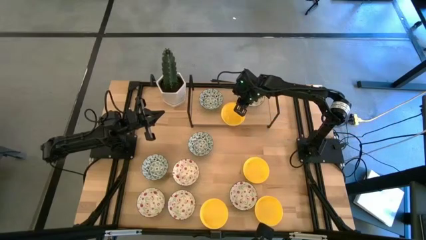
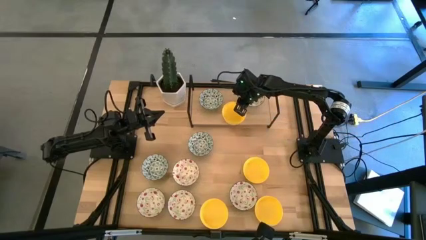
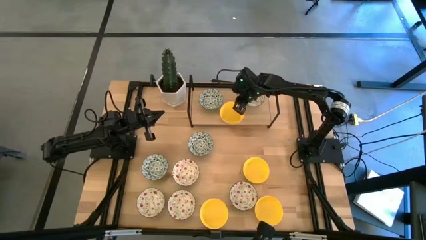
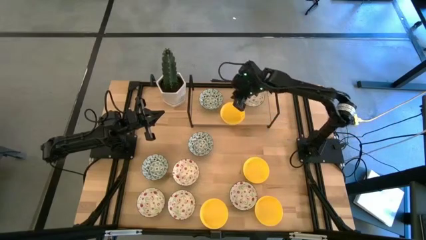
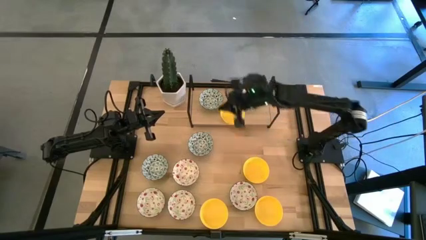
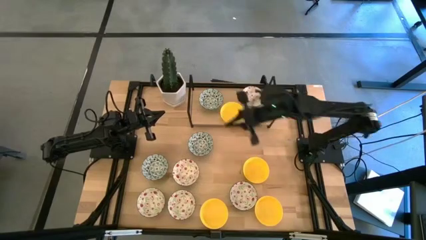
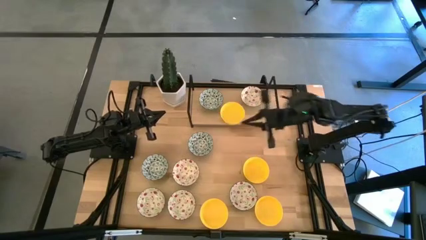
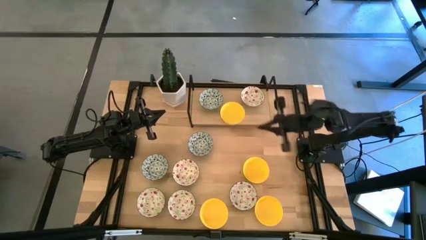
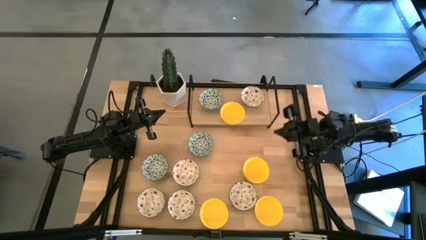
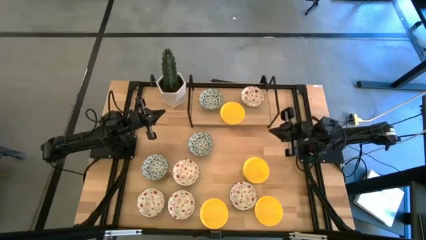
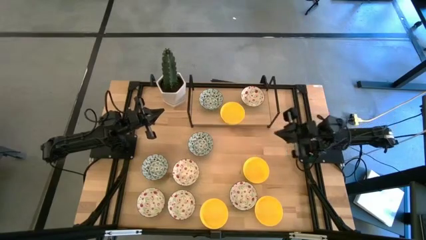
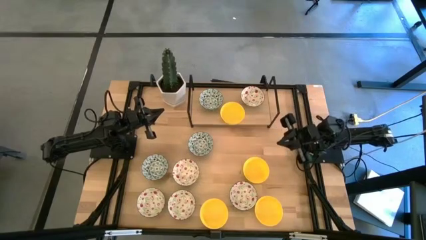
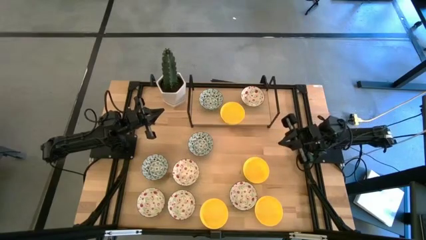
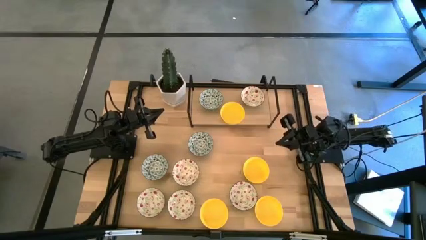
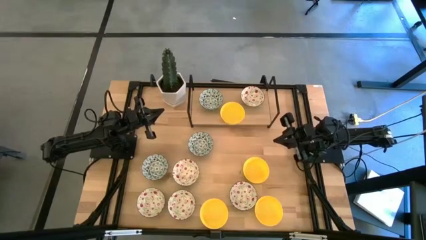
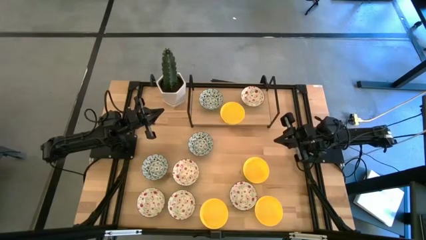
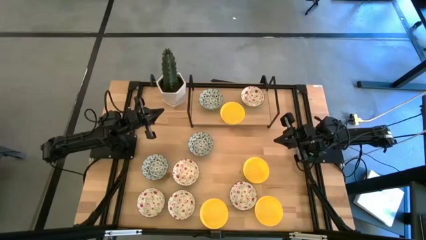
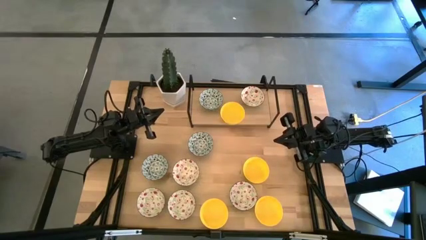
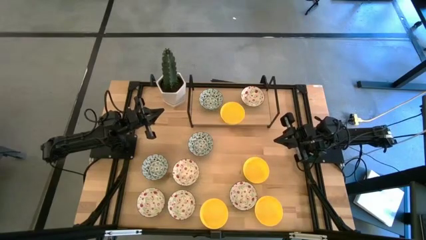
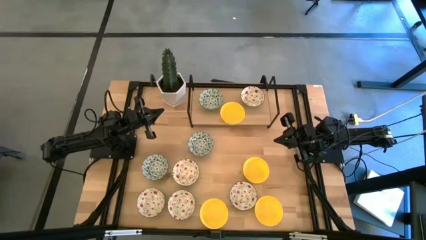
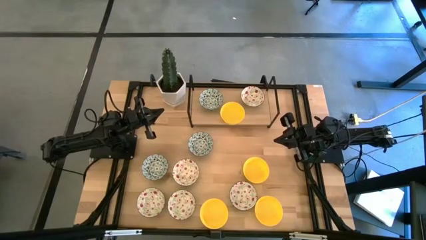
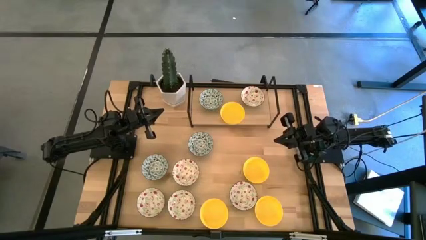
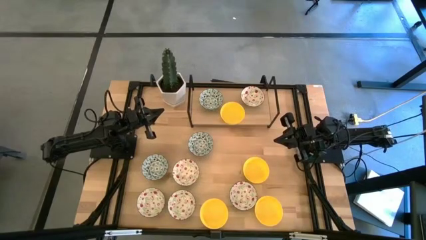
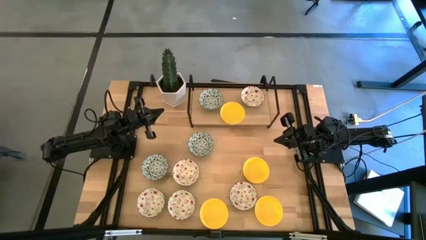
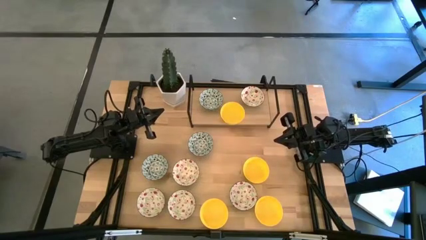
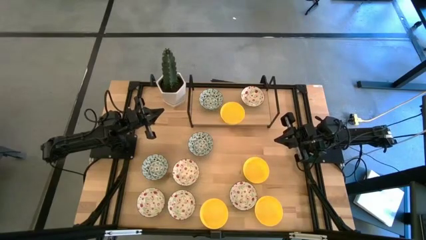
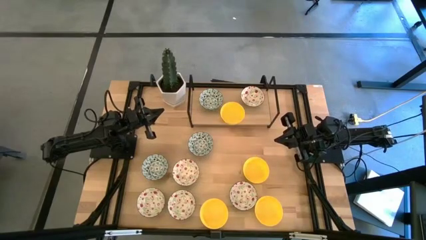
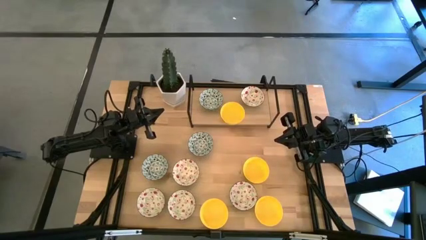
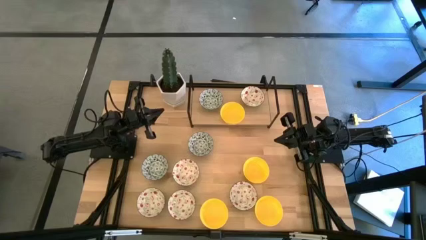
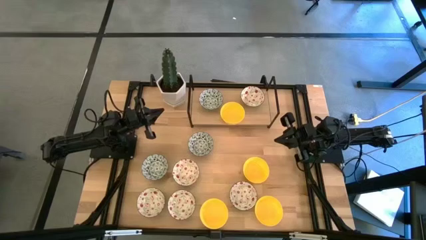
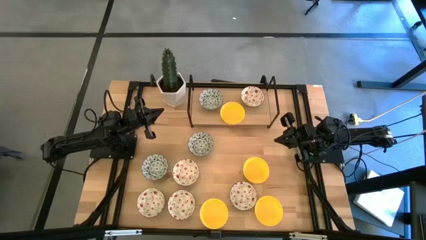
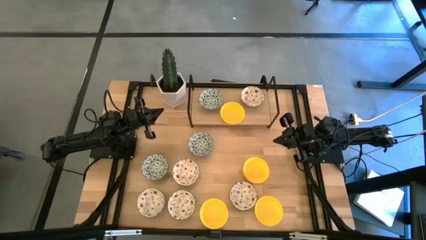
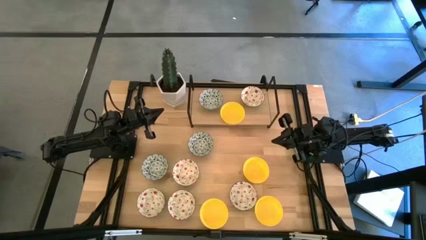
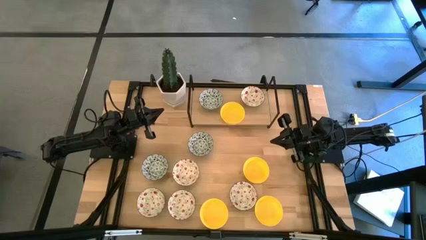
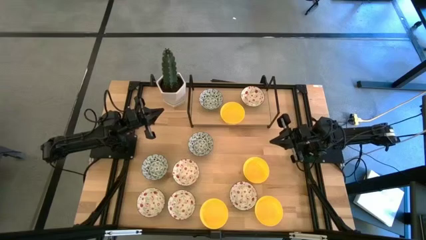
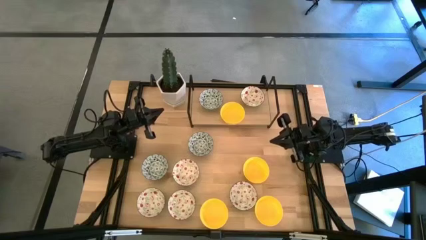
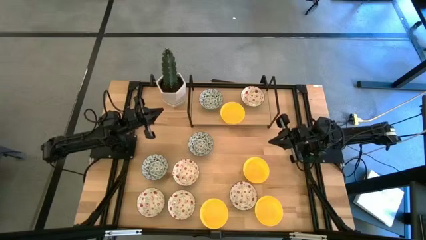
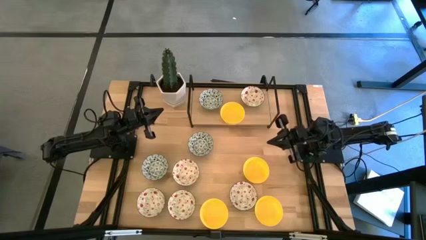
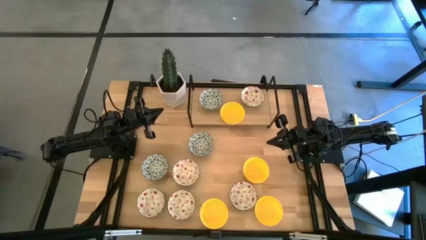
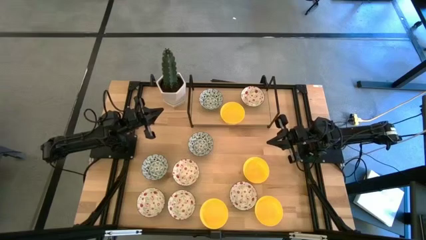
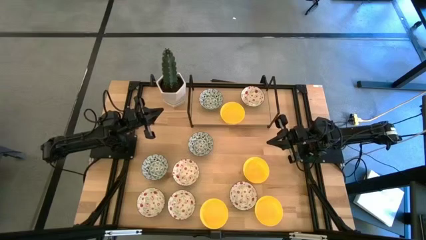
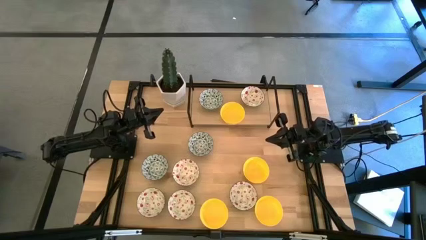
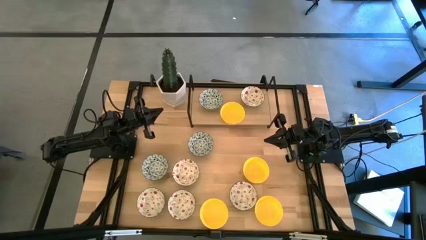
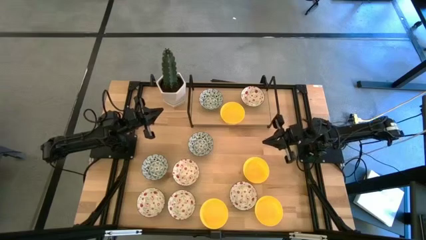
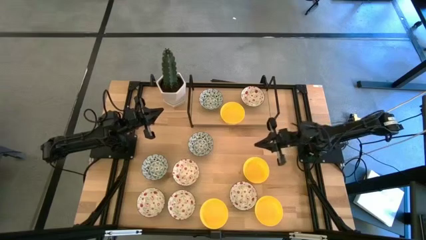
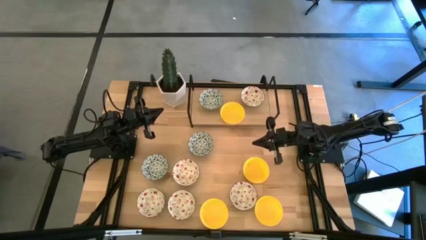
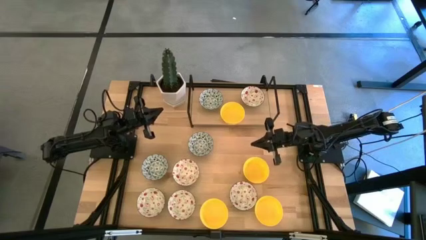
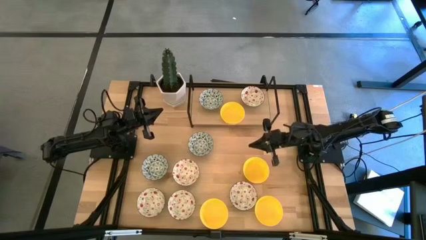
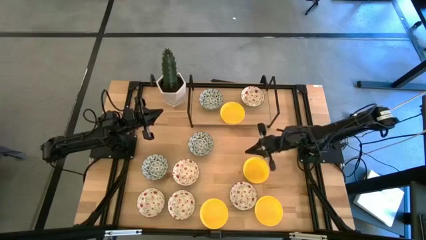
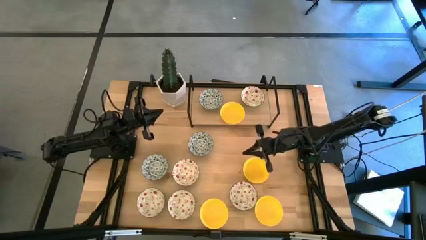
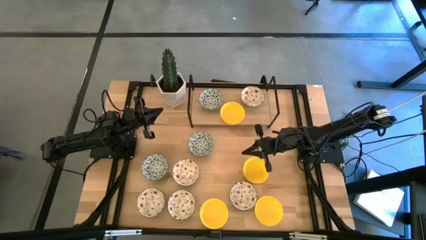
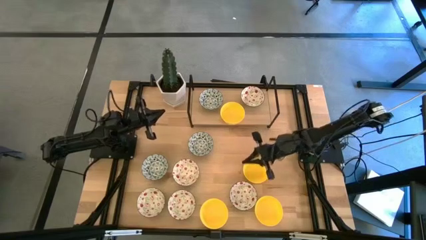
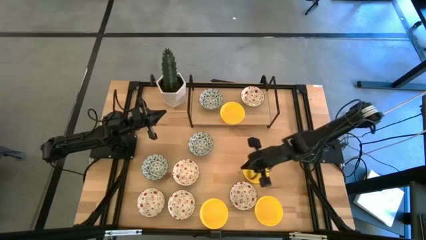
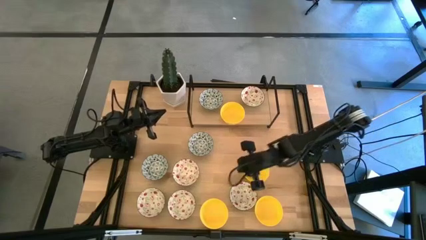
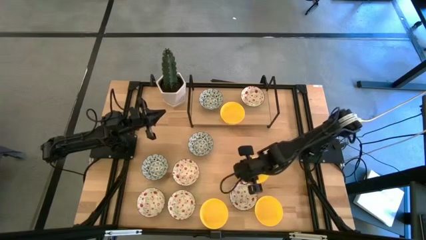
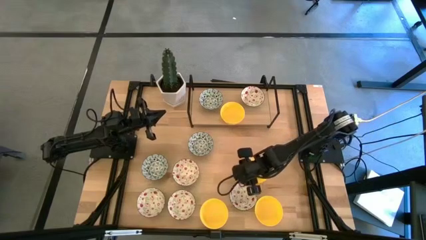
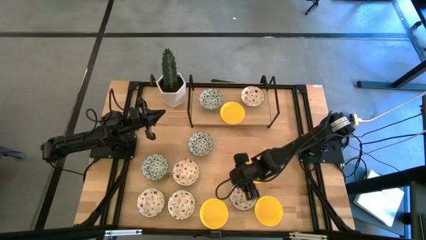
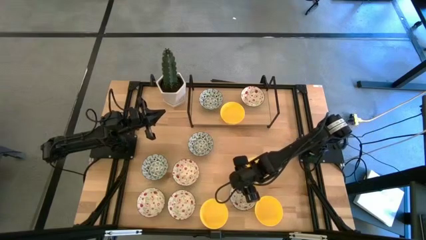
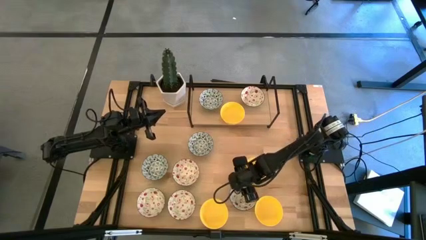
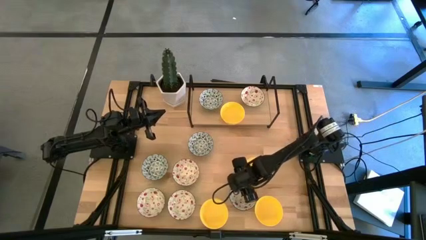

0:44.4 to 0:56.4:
Task: Pick & Place Mini bowls
Stack the green printed bowl on top of the green printed bowl on the shelf

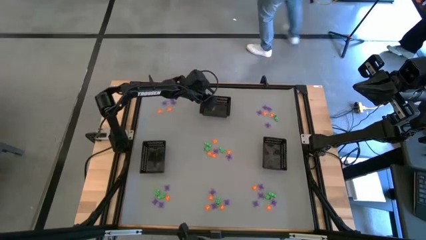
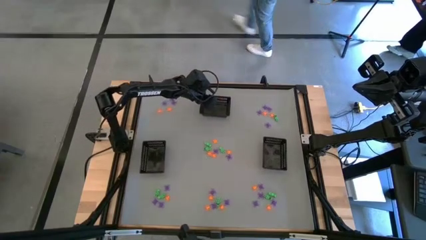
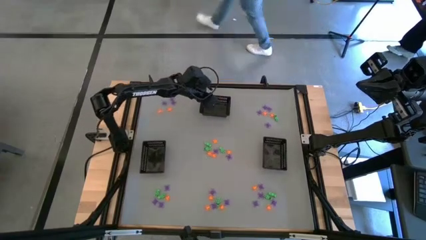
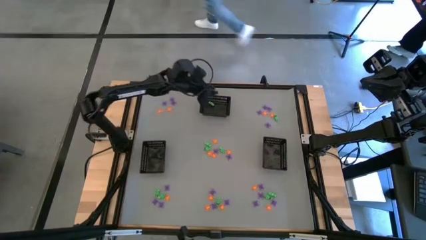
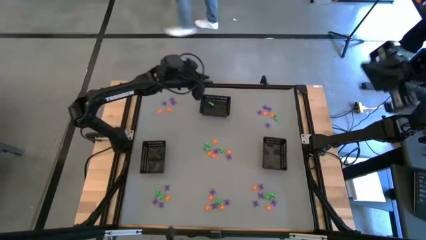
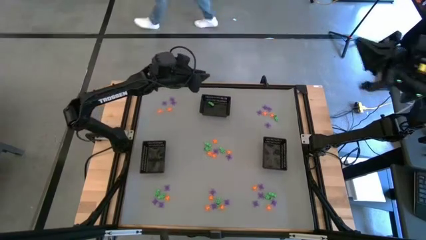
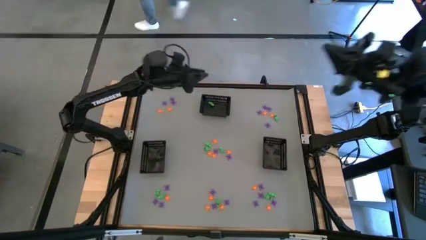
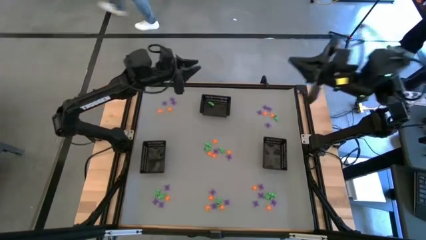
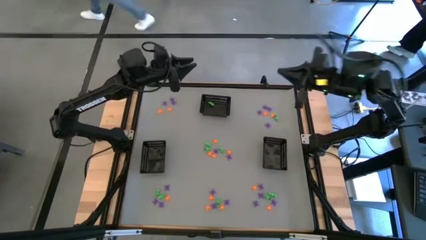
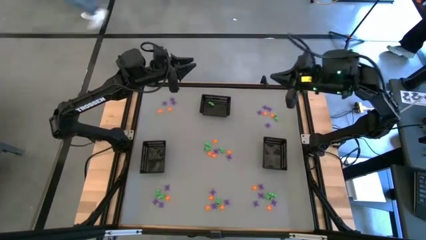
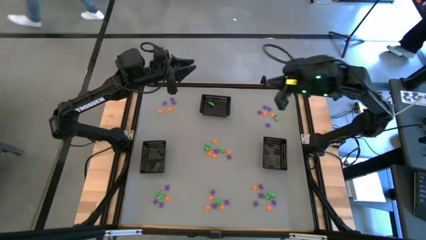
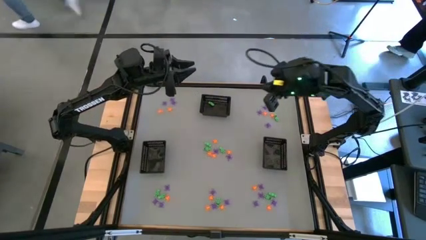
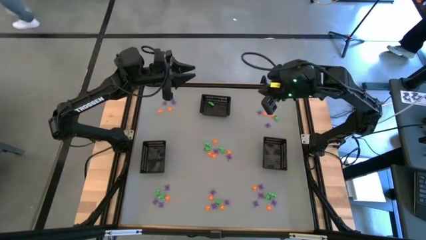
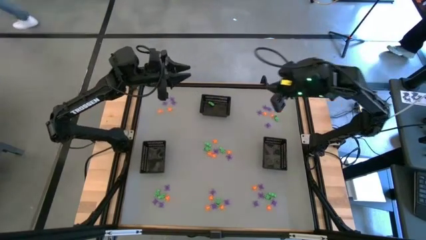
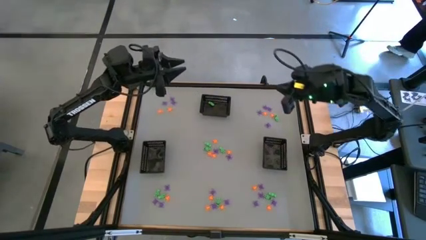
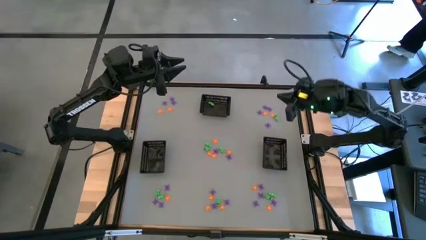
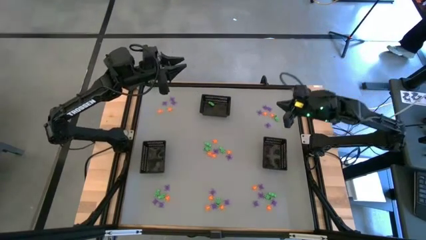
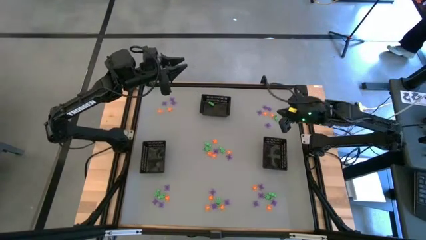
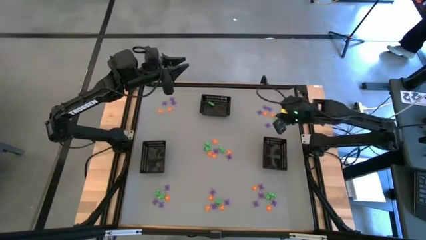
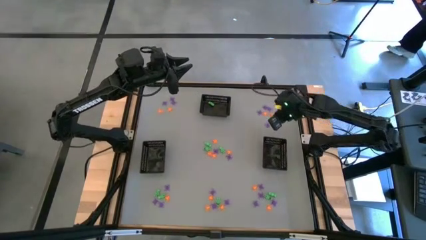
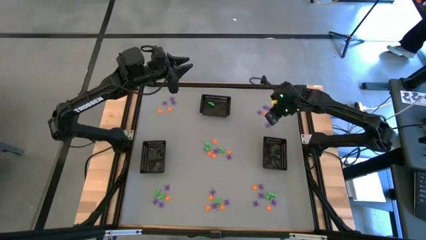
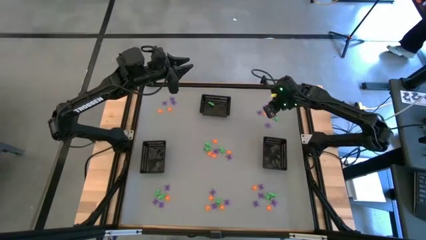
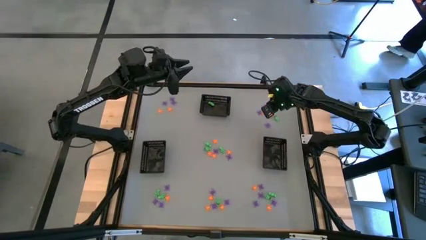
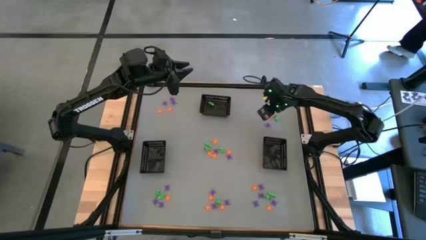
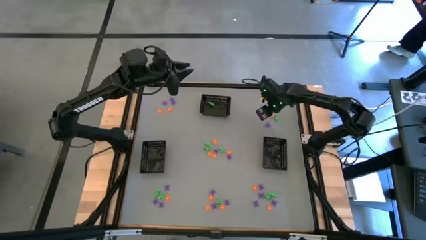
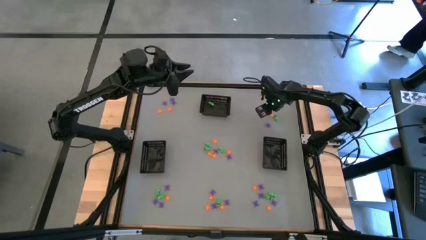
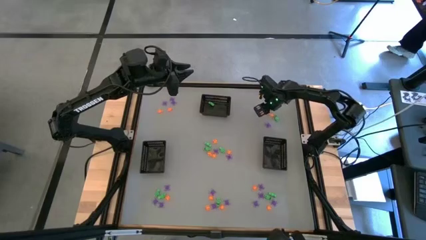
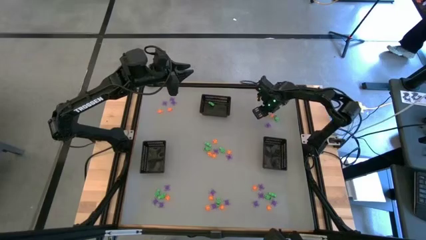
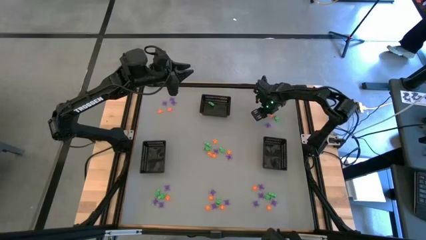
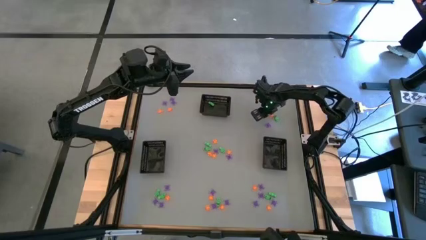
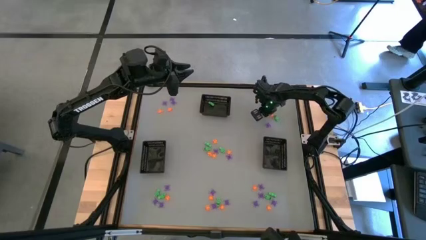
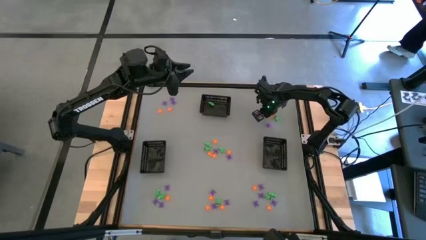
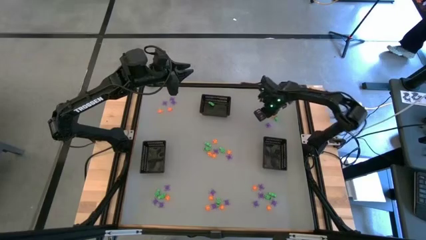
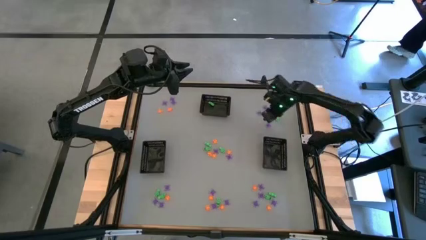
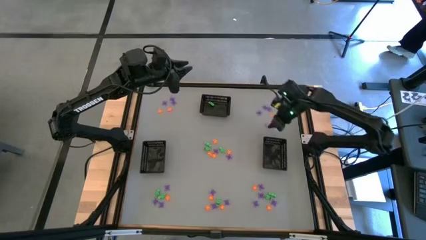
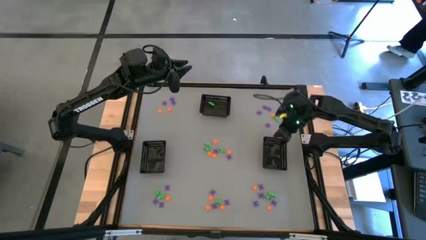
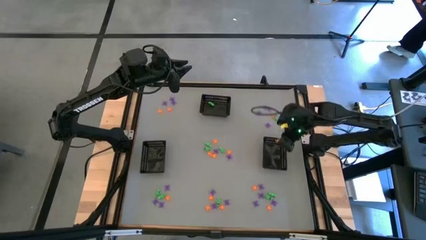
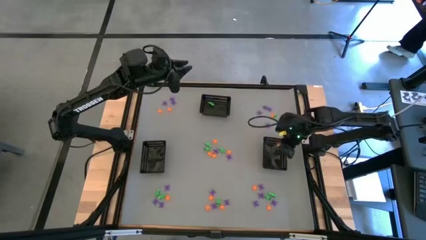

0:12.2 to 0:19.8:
Task: Sort Halloween decoration
Put the orange spider toy into the right bin
